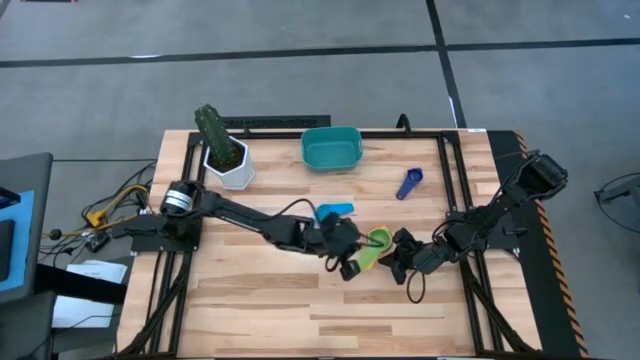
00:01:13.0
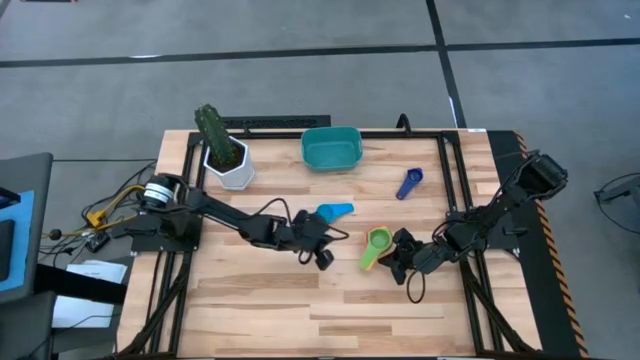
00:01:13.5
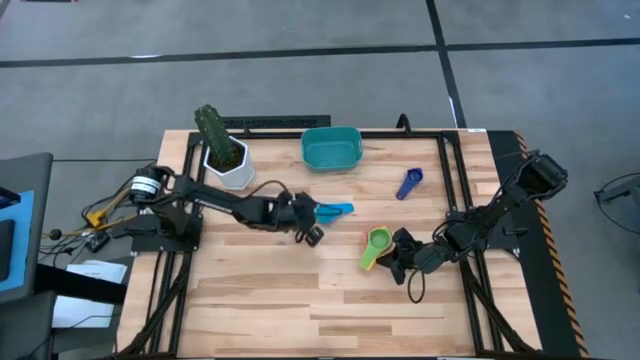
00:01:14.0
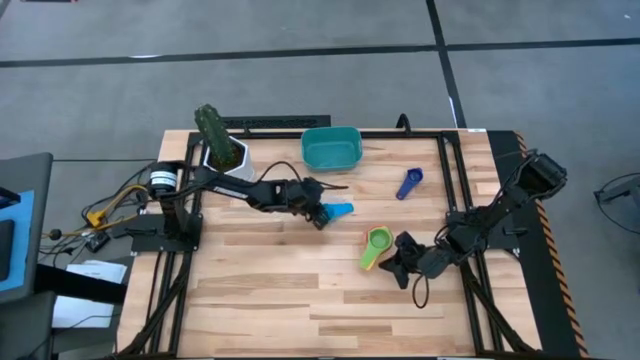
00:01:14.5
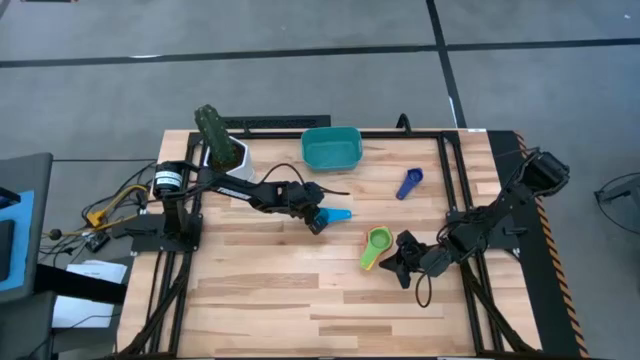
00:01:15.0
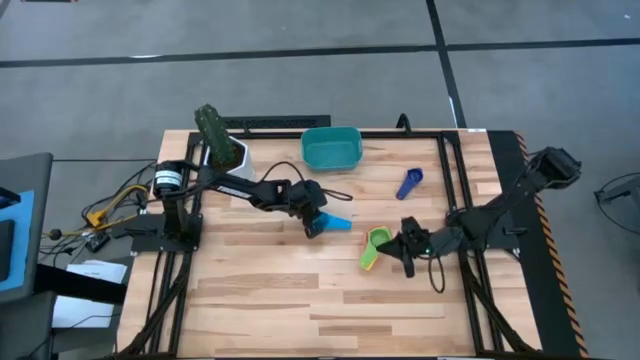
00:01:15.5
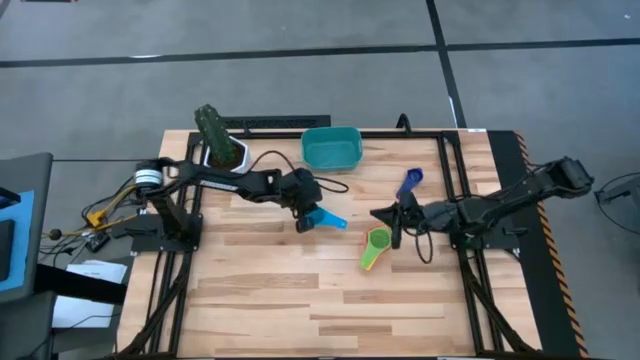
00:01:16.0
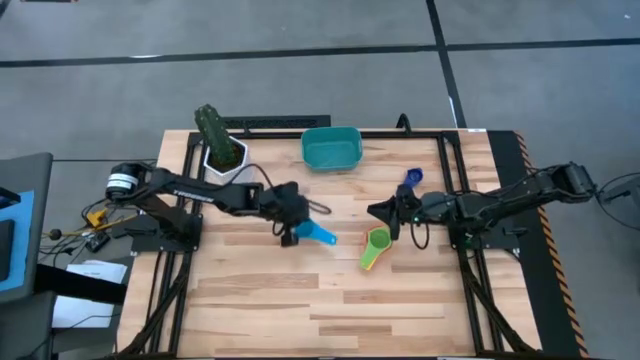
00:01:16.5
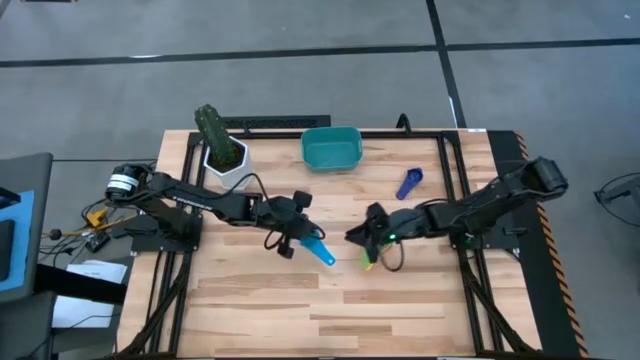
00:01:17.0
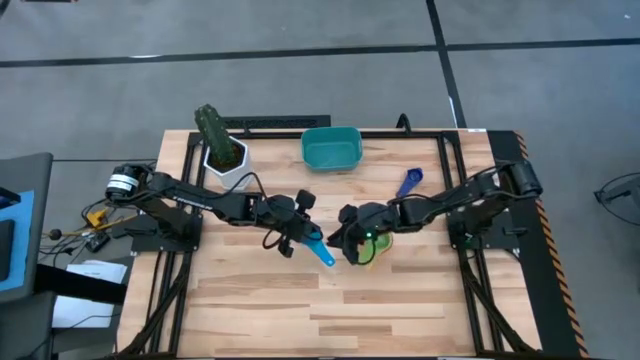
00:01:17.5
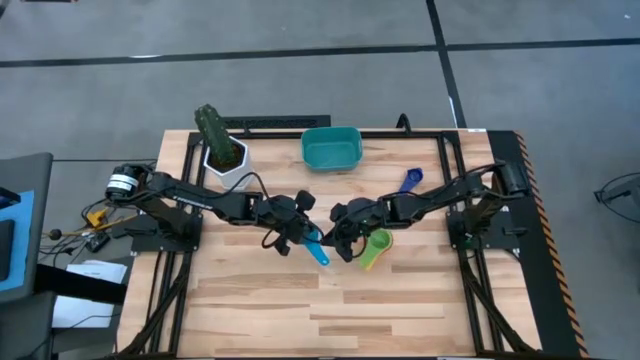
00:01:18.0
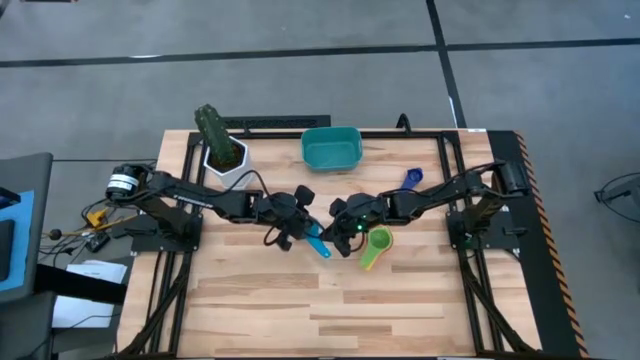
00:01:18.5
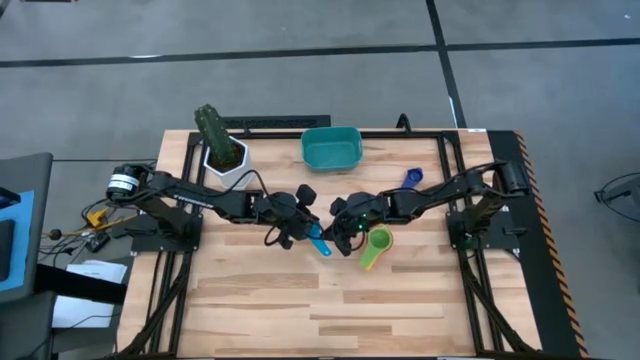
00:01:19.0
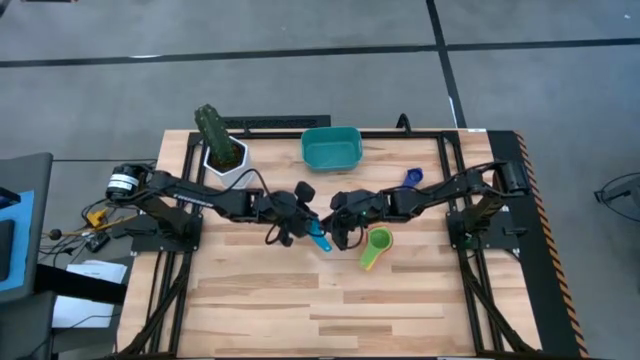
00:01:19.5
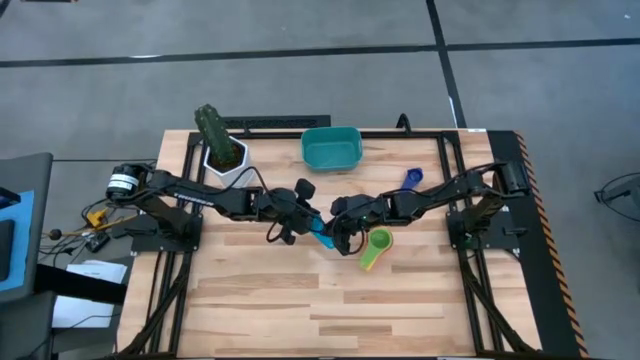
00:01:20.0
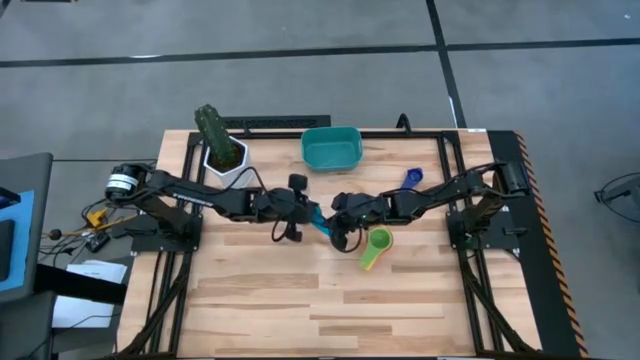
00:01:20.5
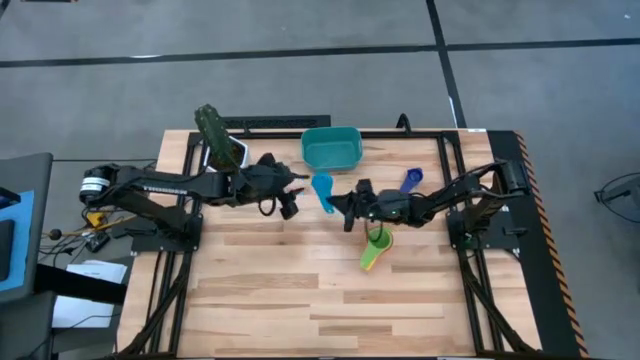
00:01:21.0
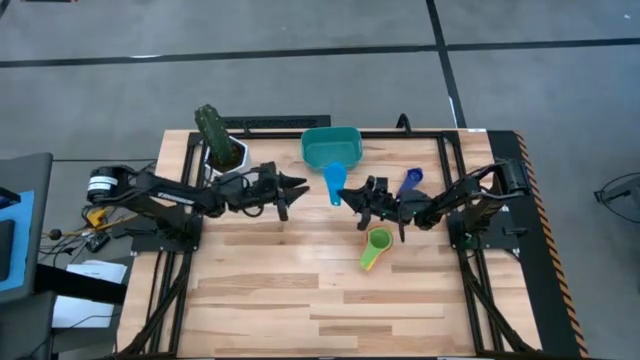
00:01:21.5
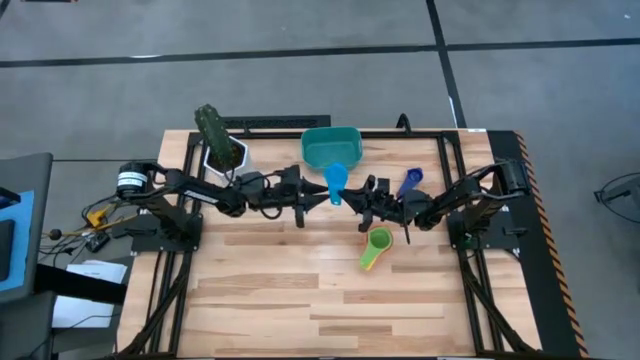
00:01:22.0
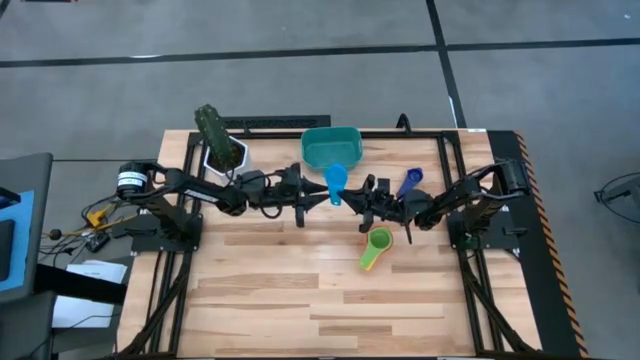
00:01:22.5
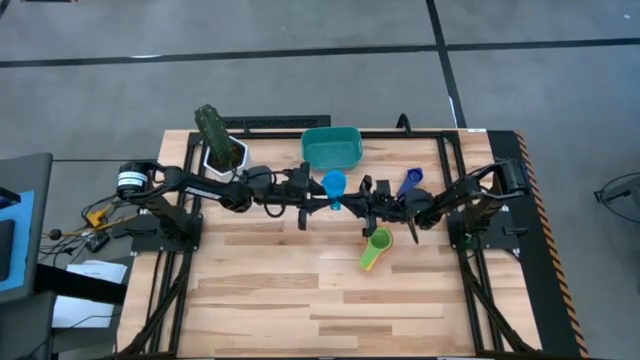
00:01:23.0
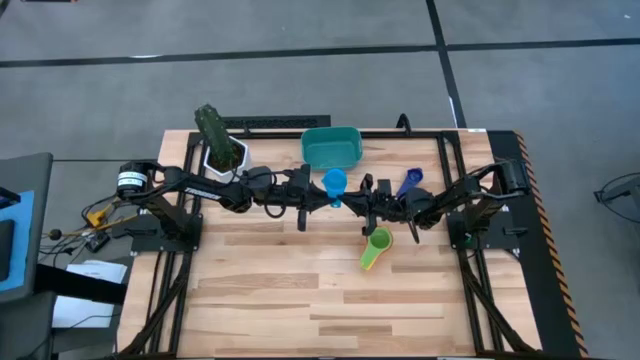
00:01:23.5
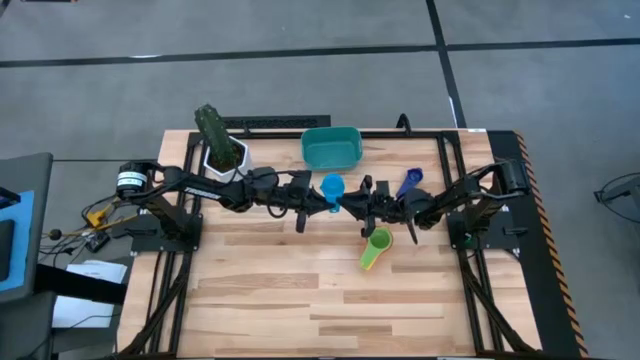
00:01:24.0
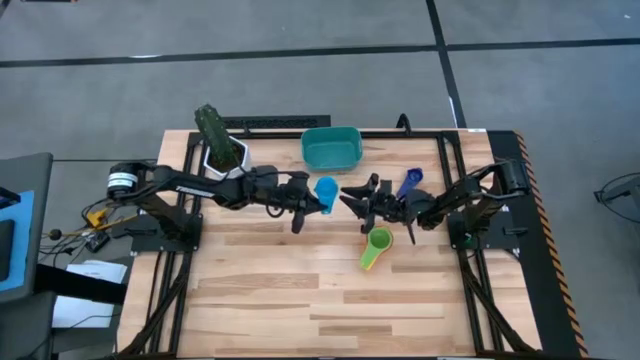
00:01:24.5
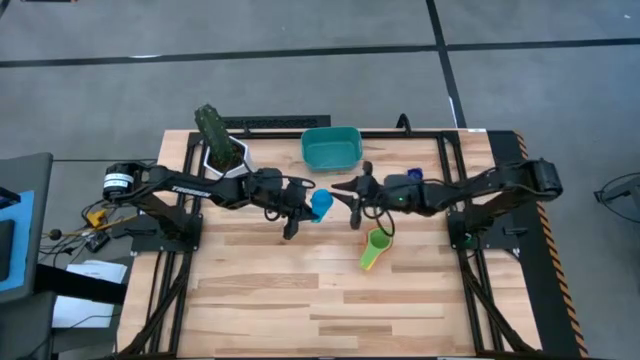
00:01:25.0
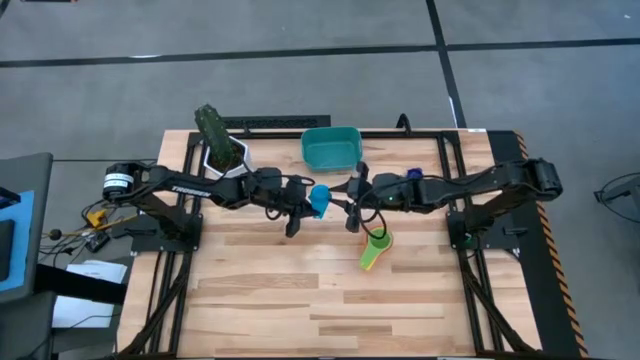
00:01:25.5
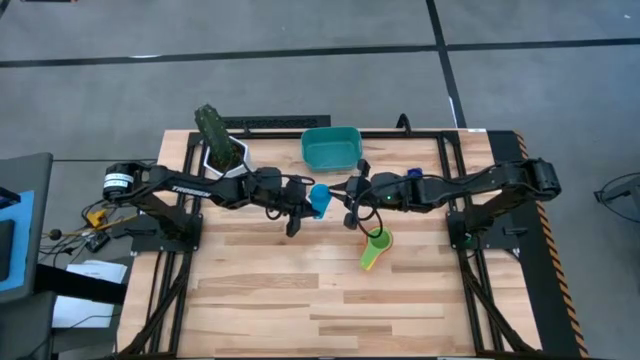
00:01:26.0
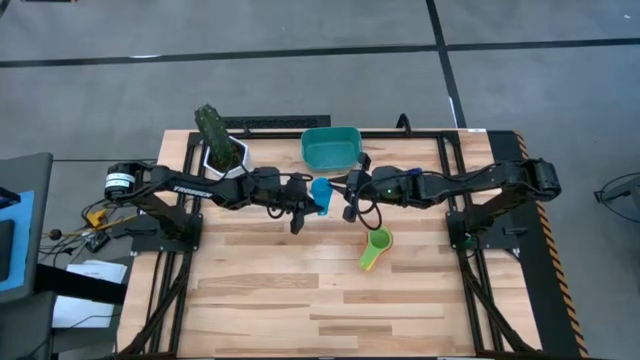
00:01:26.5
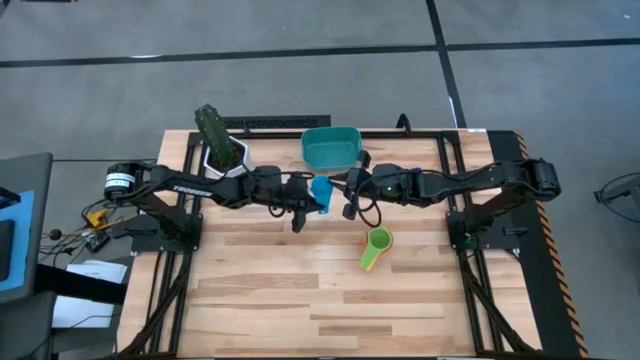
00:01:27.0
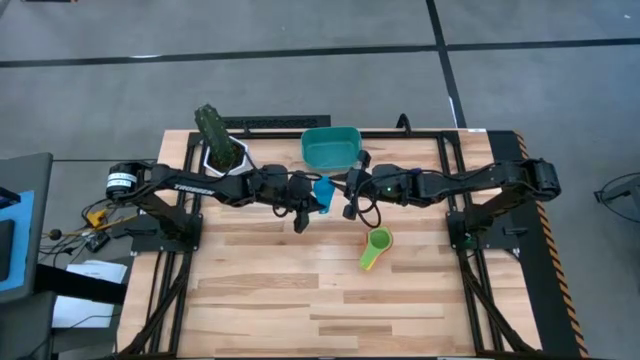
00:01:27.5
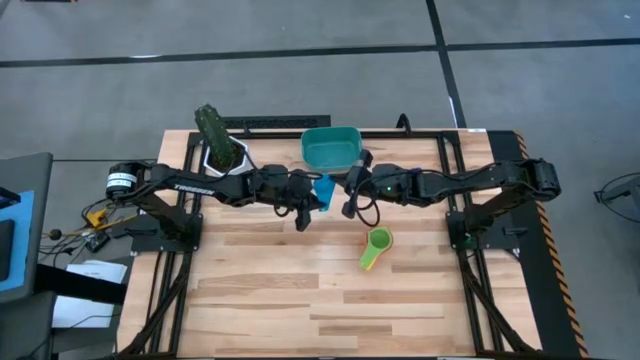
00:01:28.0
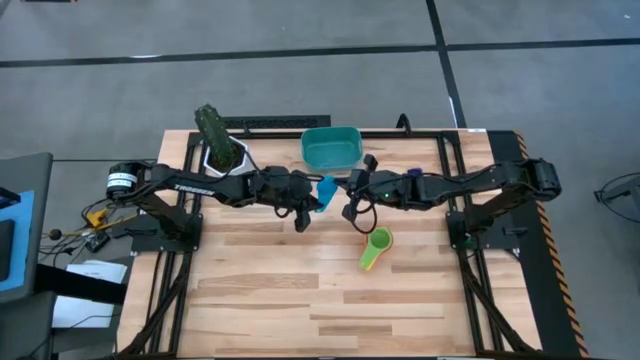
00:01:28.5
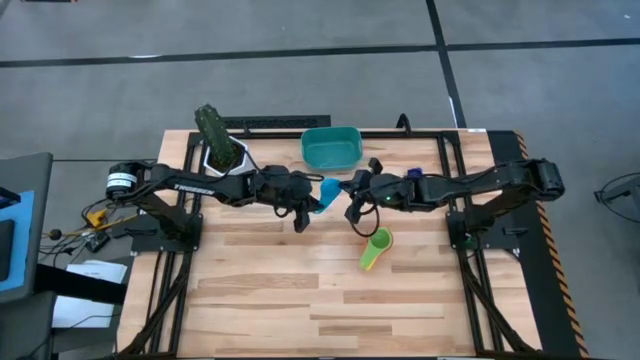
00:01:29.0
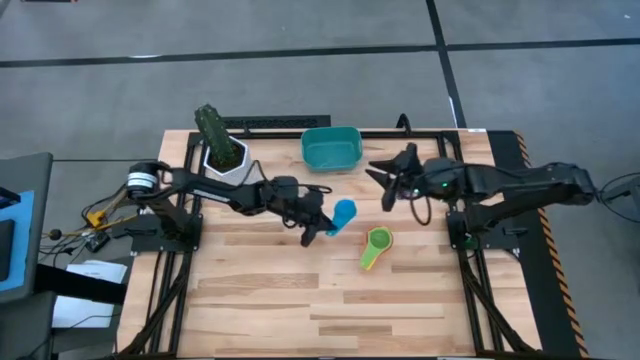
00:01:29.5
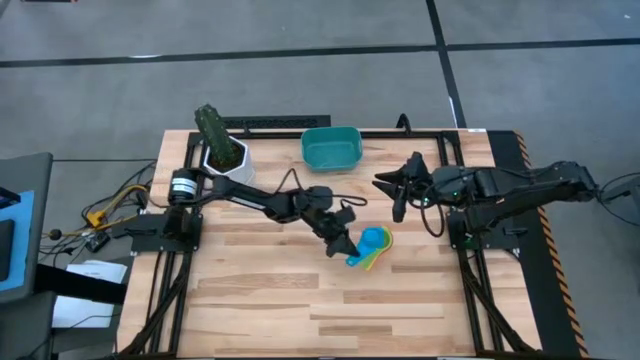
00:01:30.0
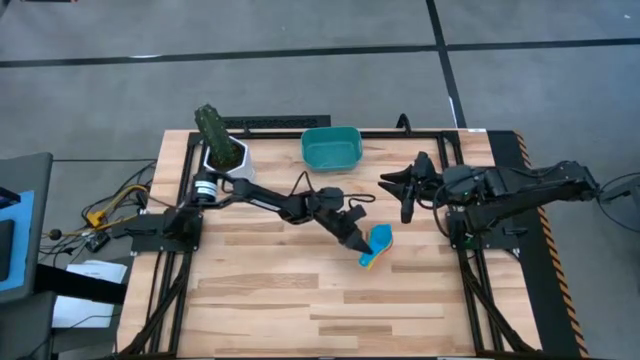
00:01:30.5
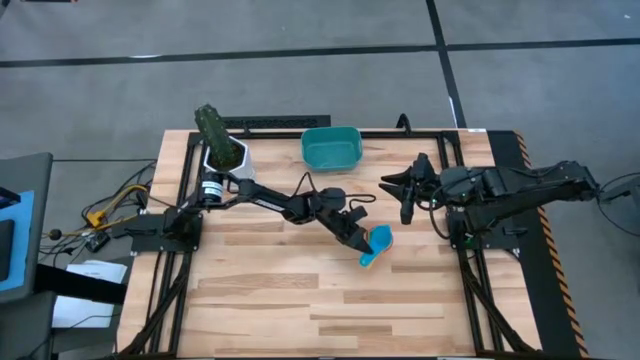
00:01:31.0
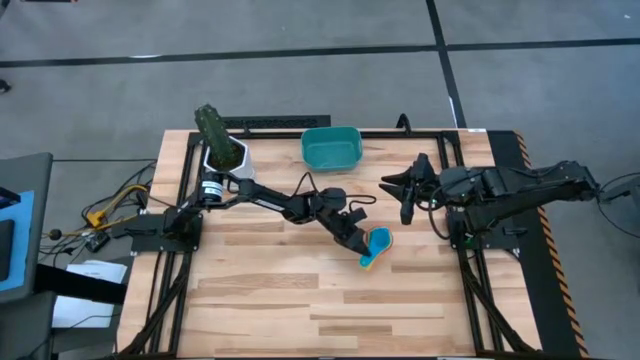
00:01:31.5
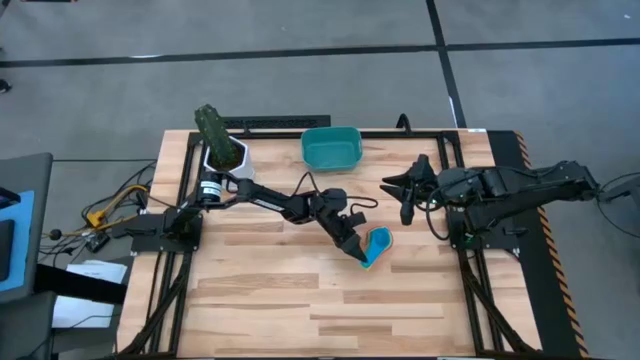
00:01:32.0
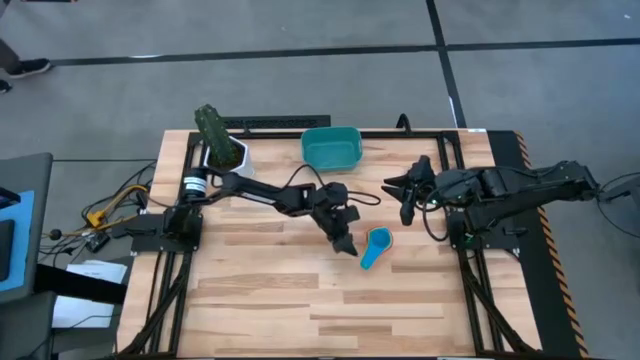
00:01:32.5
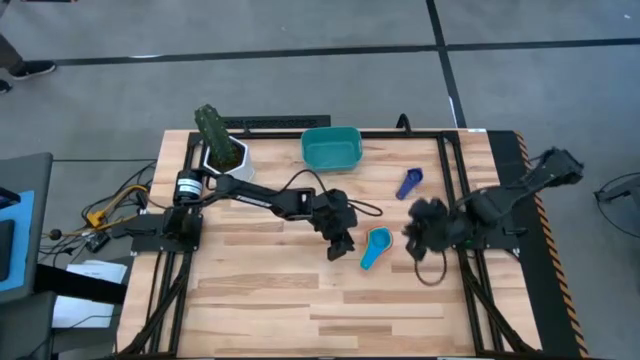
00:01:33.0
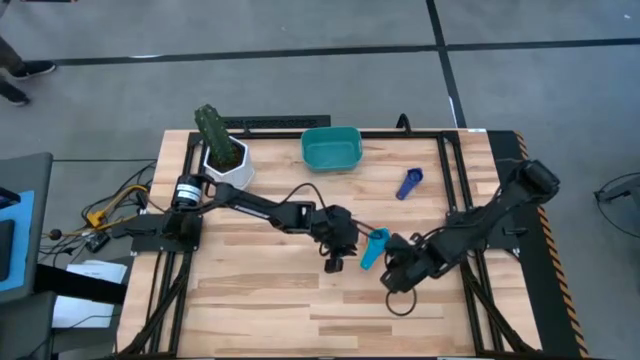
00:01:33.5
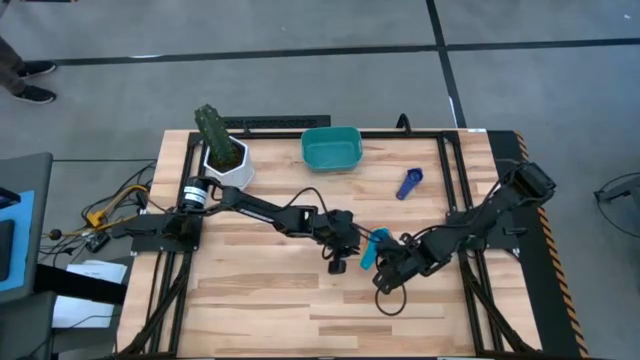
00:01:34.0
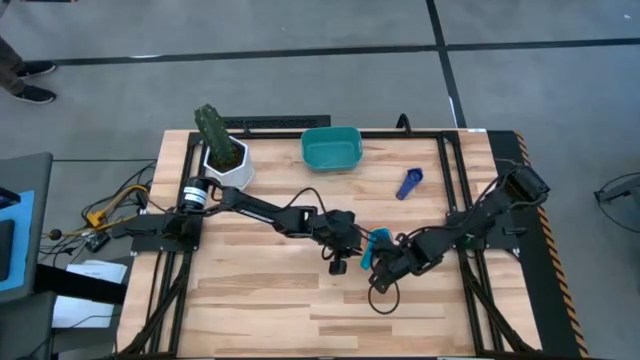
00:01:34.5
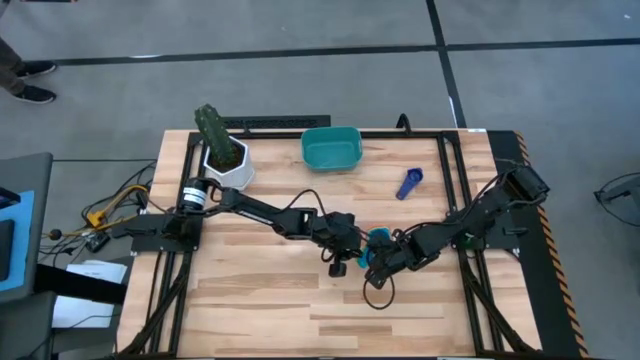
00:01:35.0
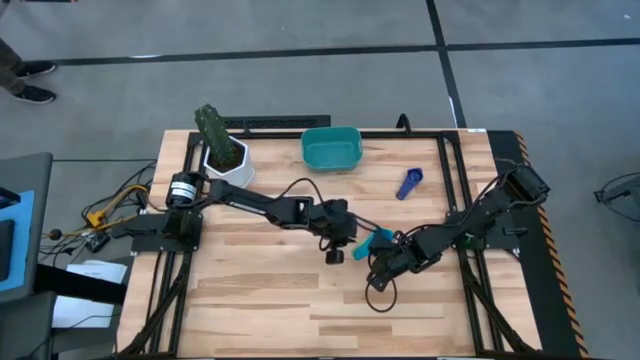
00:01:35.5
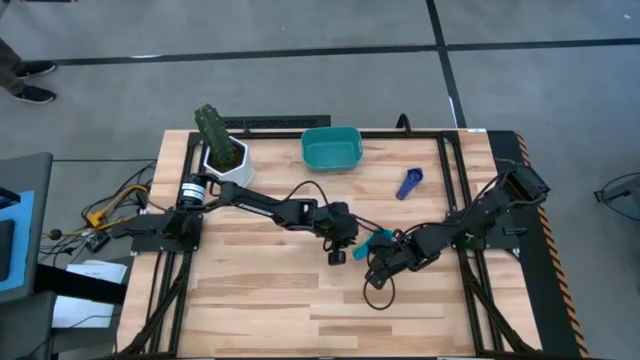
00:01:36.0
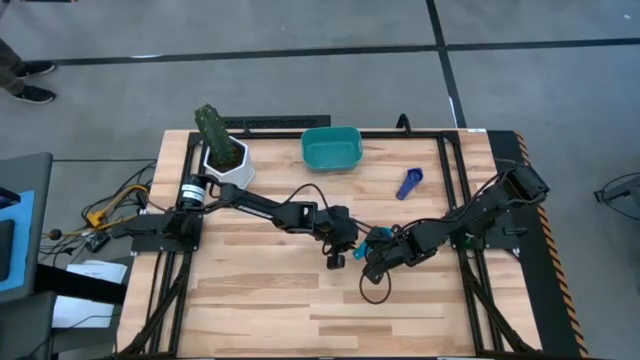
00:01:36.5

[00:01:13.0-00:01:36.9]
Task: Nest measuring cups in basket
Stack the light blue measuring cup into the green measuring cup
